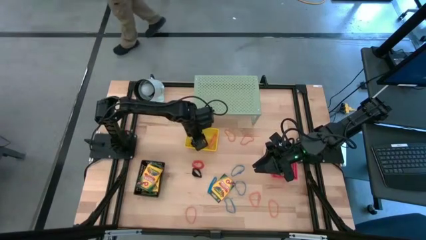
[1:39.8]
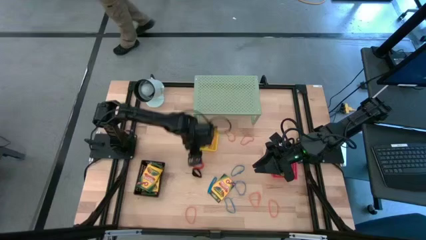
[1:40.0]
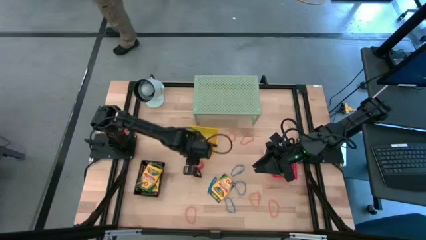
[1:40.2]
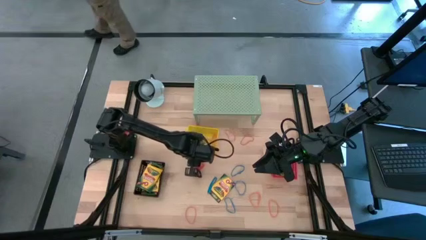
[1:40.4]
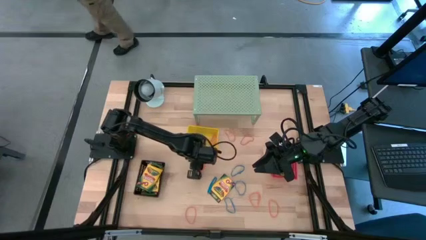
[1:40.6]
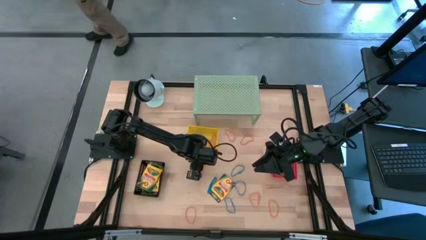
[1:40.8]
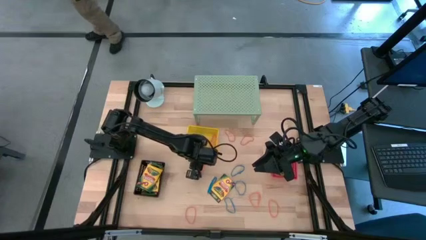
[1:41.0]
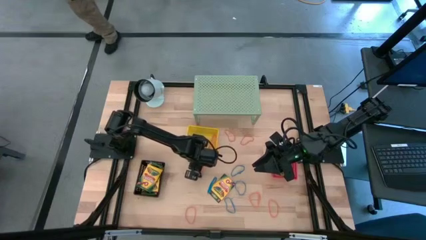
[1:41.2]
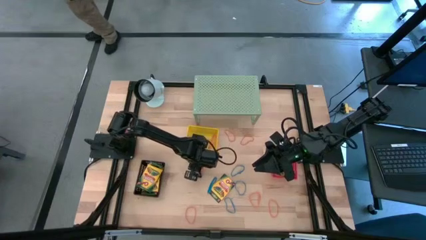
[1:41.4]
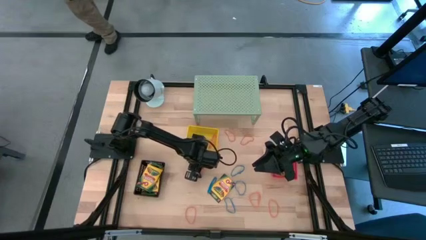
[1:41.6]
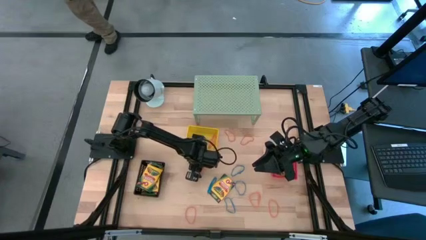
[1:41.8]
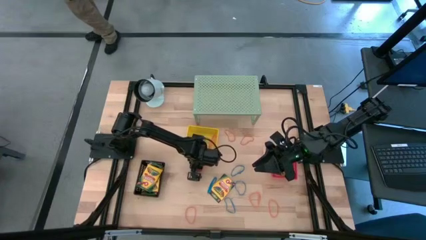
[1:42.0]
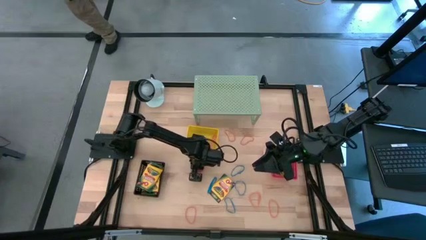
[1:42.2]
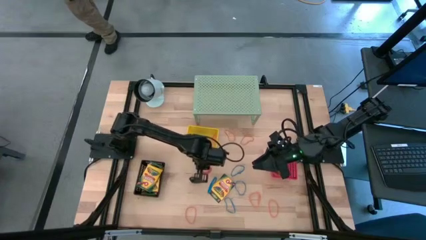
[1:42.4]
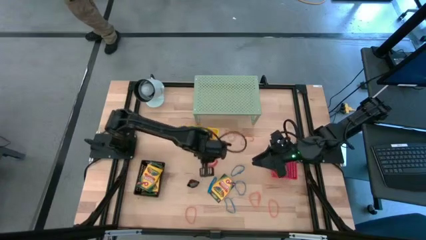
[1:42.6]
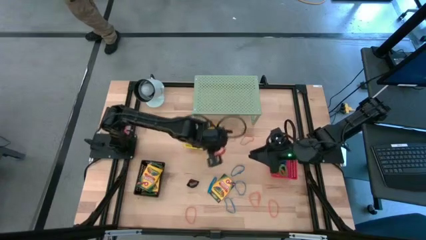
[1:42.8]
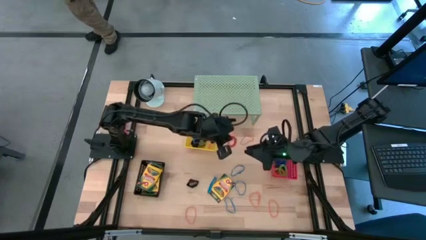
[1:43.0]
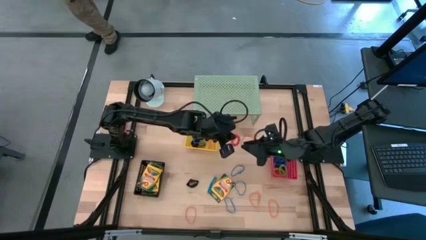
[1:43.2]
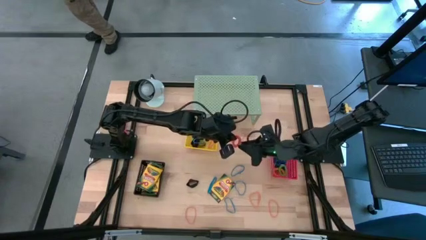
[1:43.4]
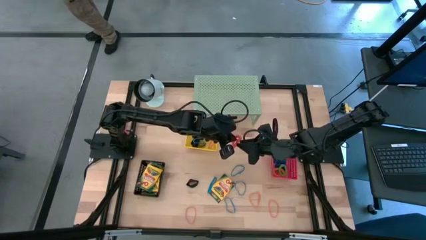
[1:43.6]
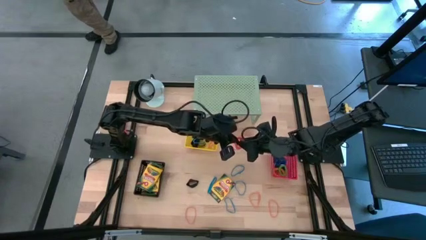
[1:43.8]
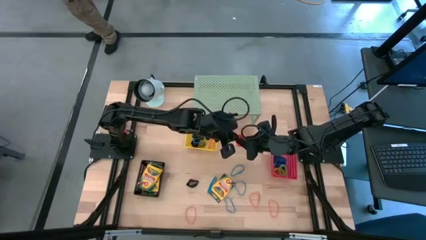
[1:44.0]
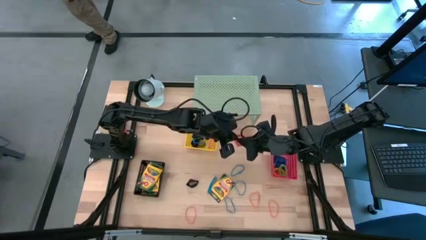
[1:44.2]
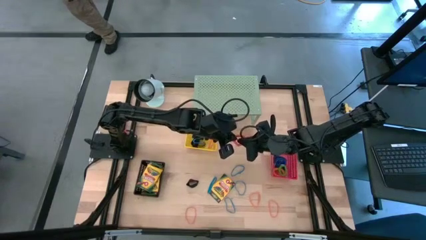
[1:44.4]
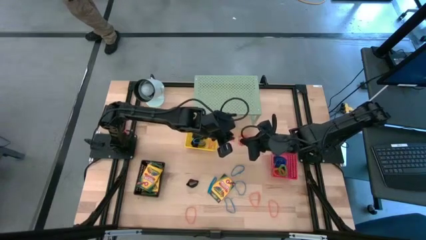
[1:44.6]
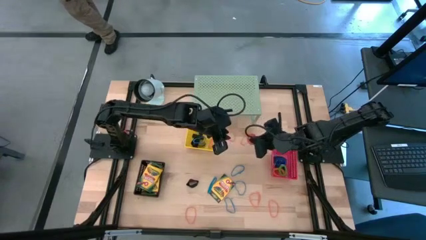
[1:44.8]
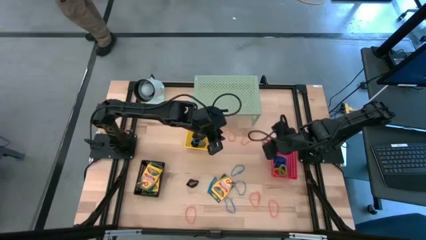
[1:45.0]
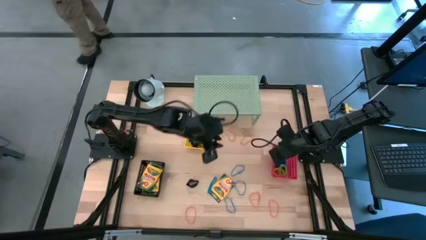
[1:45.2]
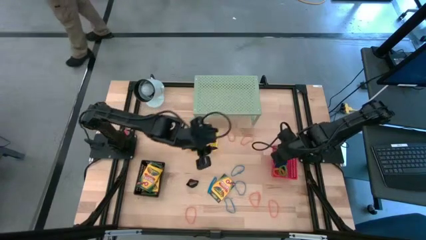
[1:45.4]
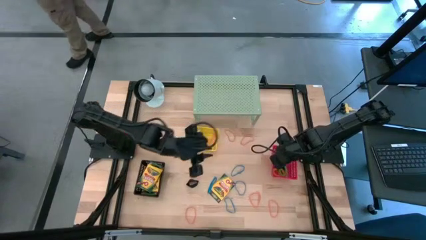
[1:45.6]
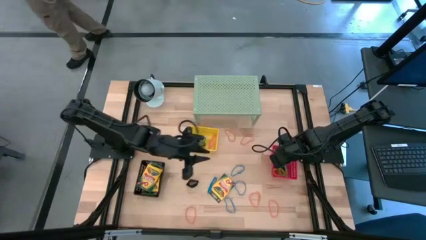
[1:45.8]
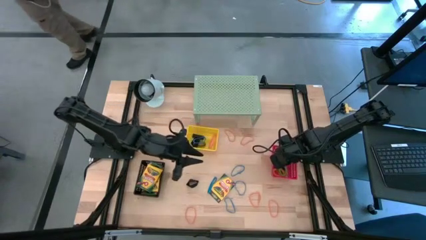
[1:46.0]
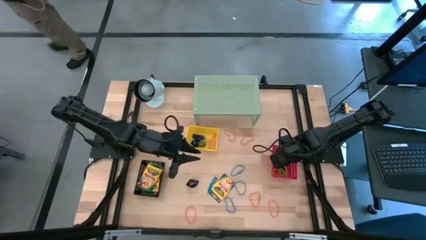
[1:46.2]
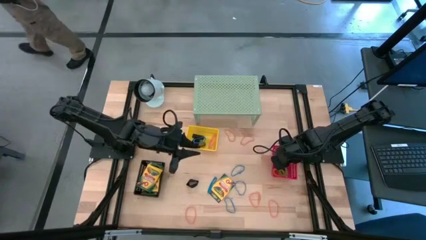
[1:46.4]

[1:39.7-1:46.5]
Task: Pick & Place Office Desk Supplies
Put the orange spring keychain into the red bin

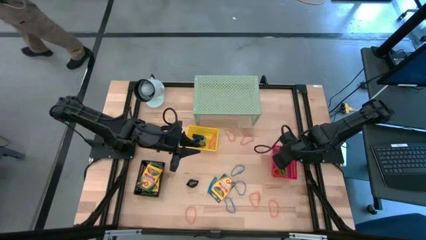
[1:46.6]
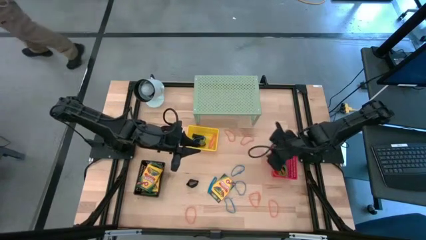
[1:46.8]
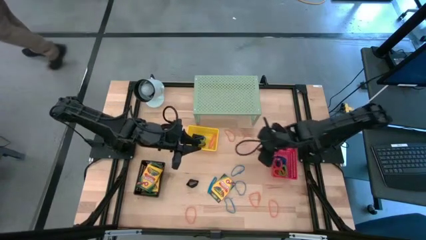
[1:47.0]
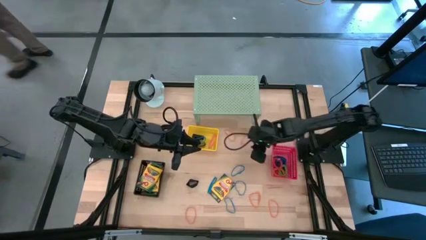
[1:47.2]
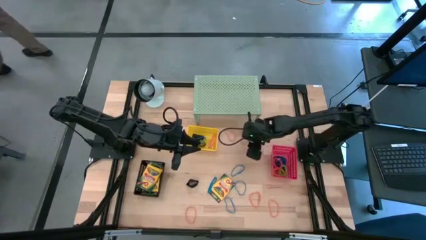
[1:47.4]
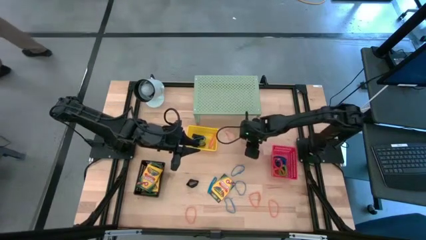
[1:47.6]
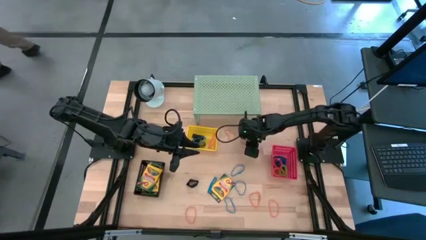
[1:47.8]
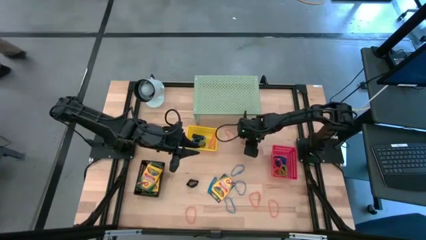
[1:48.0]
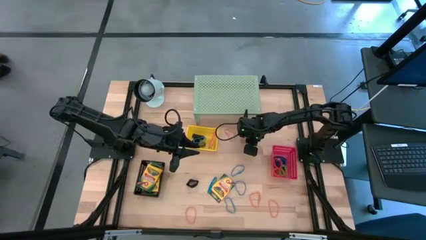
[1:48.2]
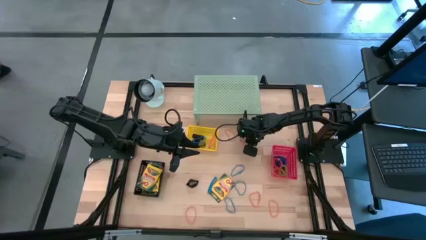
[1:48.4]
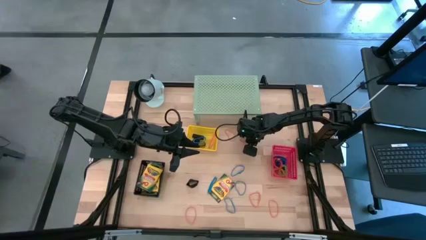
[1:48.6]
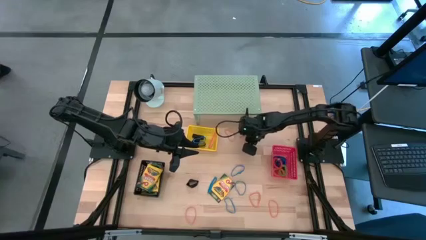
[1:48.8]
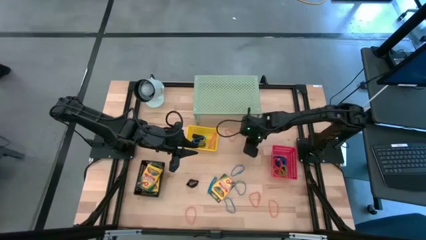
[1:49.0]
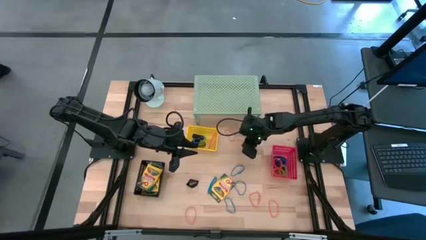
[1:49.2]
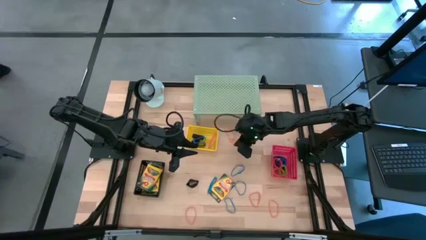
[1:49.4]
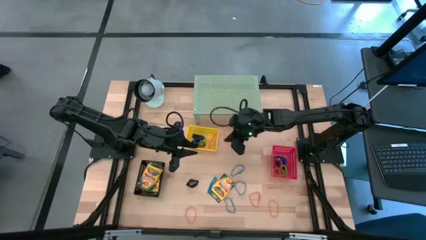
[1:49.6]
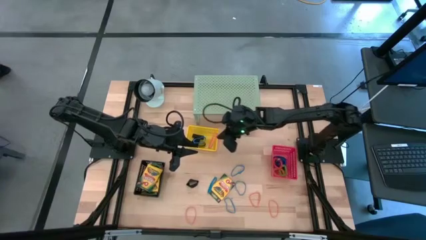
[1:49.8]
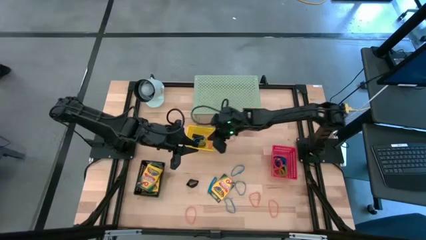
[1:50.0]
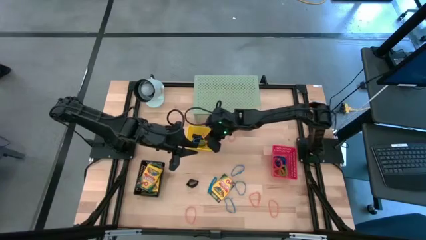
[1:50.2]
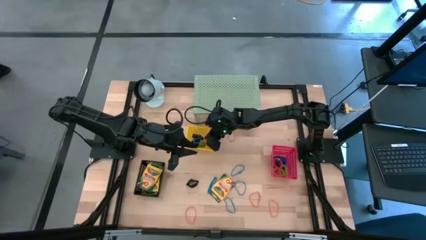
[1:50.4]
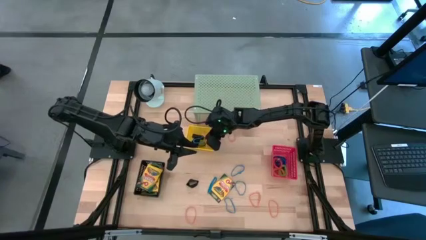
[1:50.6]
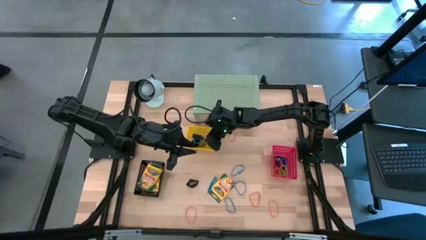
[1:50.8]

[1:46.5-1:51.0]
Put the orange rubber band into the yellow bin

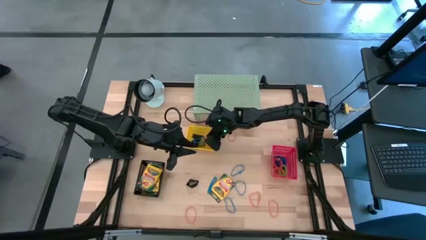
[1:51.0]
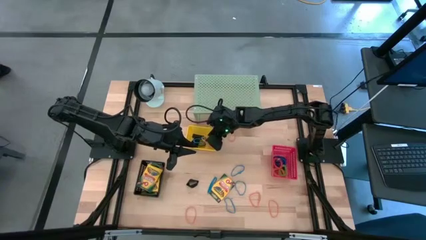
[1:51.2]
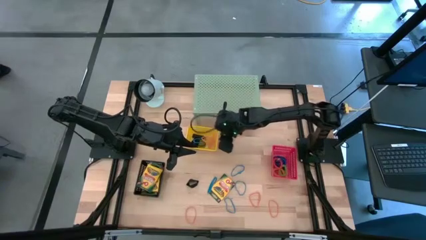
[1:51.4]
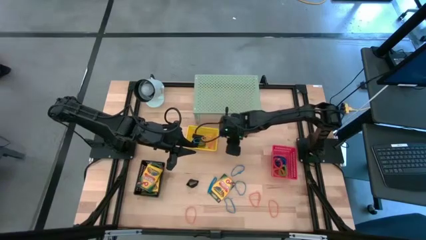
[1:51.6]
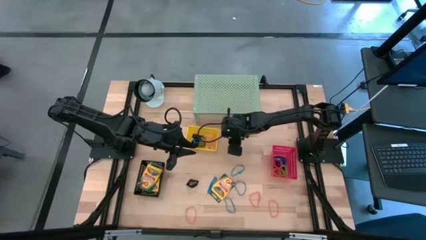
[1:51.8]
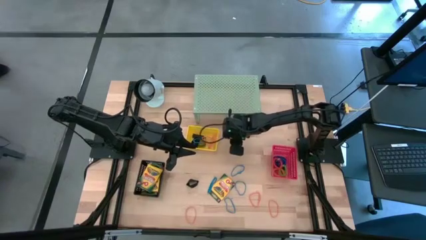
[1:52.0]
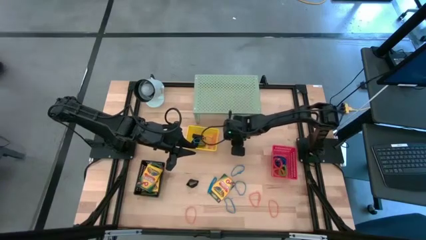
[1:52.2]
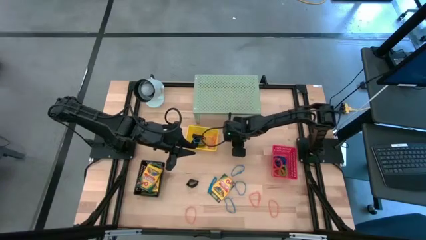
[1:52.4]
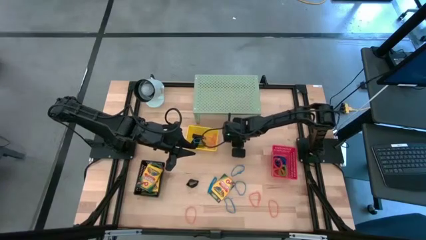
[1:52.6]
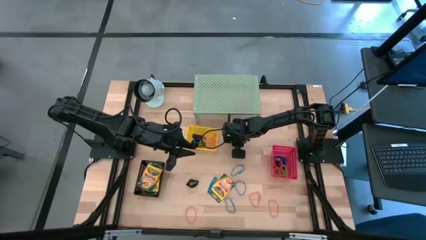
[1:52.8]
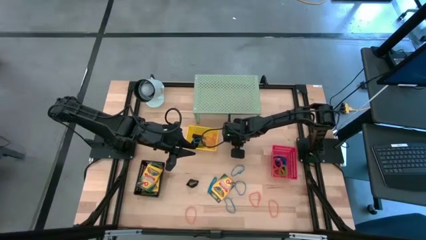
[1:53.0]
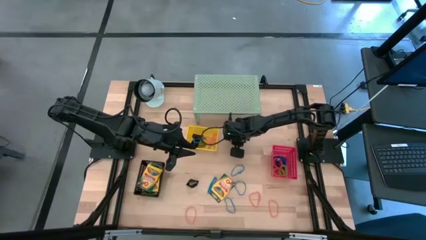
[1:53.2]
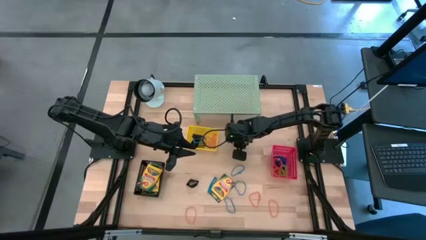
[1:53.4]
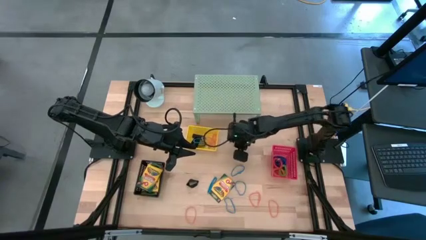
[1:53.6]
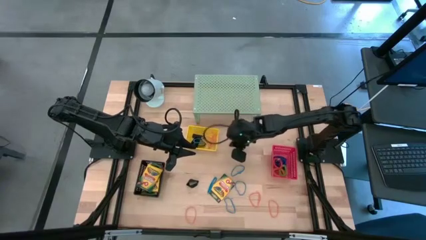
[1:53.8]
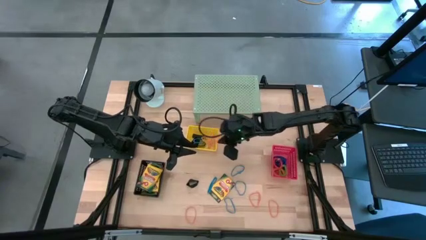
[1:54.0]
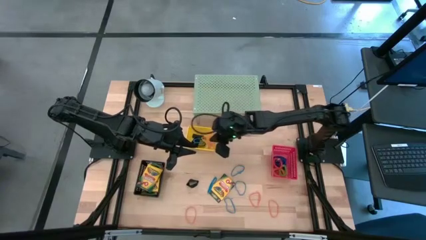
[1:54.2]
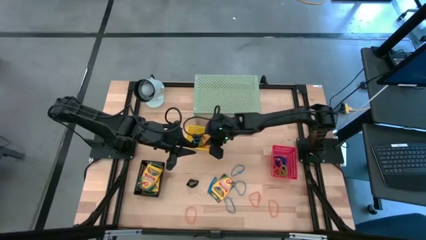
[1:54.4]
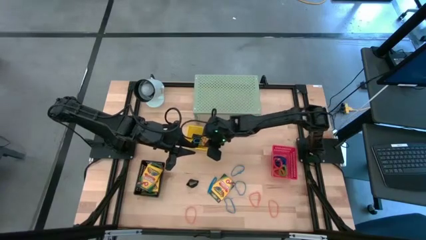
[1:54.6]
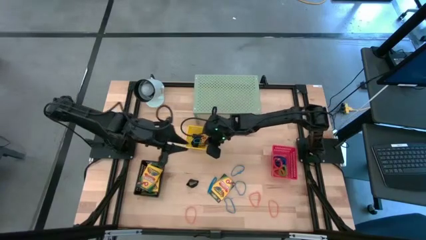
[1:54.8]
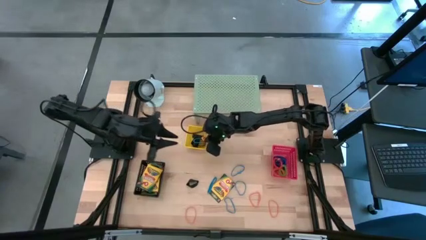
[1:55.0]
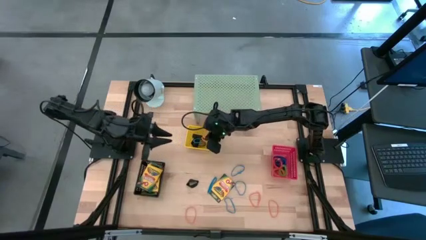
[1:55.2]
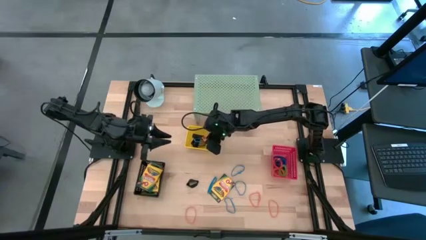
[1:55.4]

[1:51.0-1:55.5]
Put the orange rubber band into the yellow bin

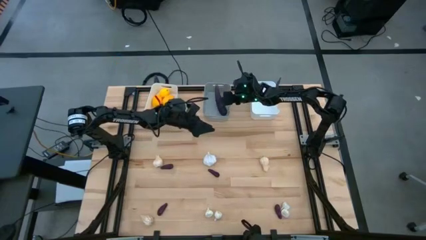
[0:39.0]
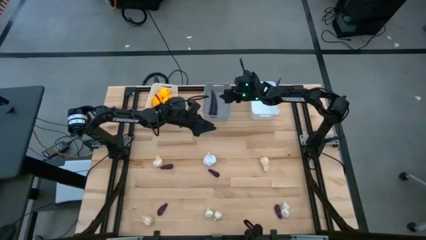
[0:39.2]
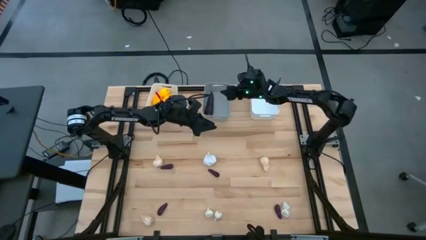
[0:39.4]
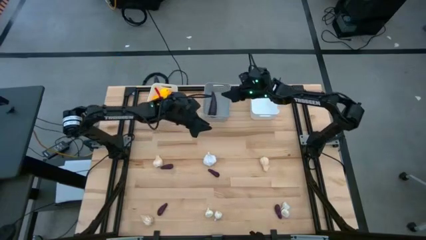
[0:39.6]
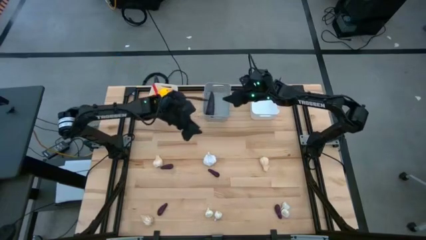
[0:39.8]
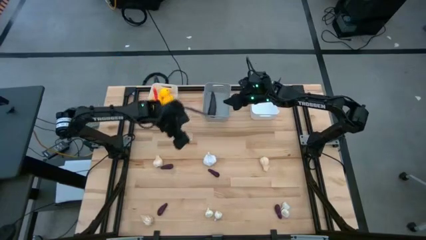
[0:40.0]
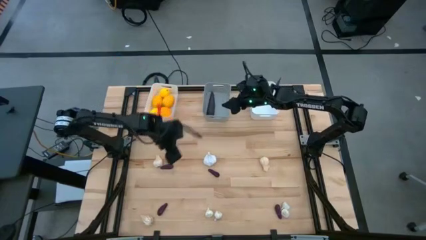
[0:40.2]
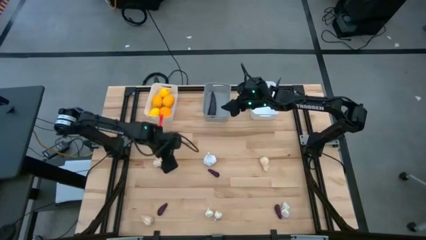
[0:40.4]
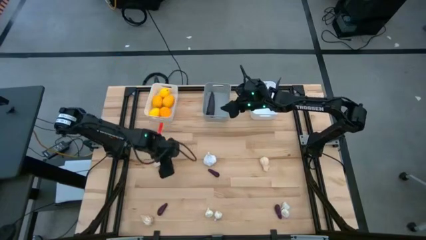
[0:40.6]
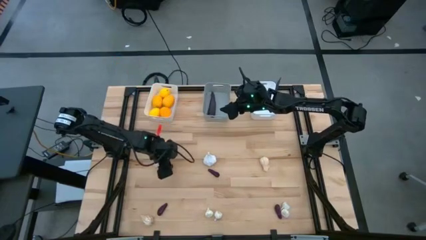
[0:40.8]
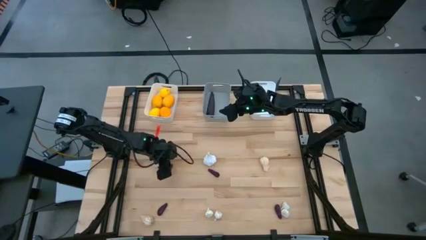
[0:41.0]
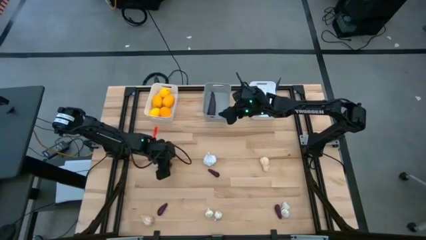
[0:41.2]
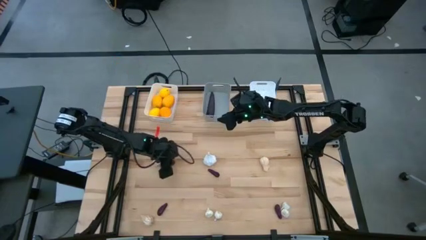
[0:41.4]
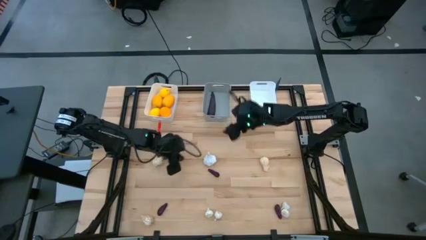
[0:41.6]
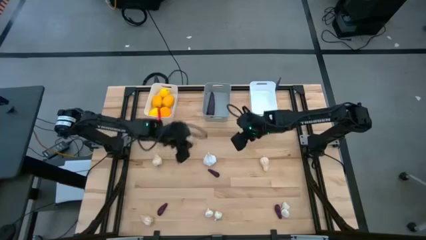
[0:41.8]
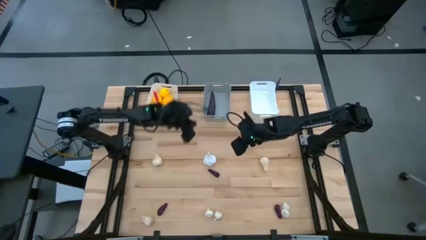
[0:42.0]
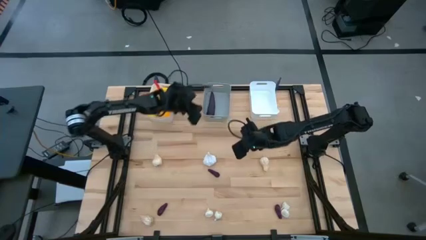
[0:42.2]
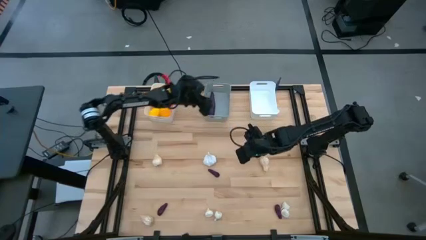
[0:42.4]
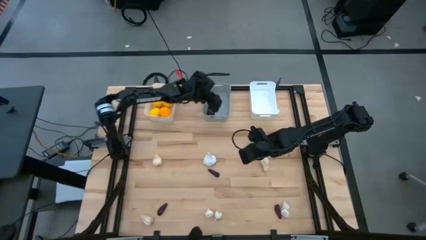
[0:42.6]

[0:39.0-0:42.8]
Task: Sort produce into baskets
Put the eggplant into the gray bin
